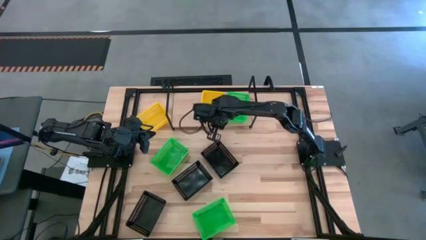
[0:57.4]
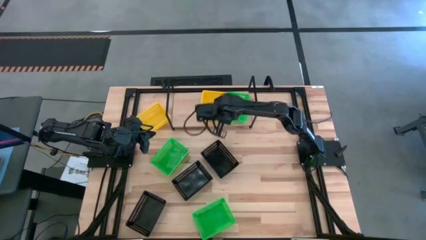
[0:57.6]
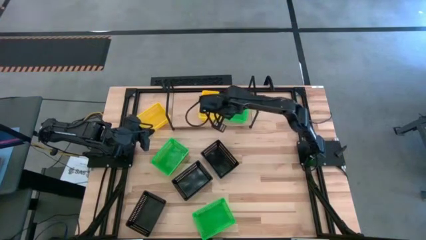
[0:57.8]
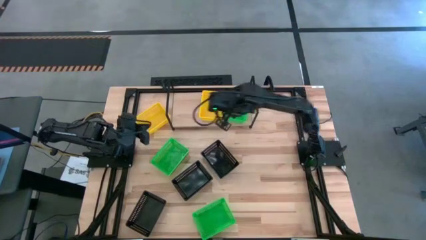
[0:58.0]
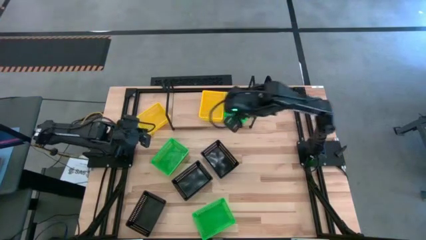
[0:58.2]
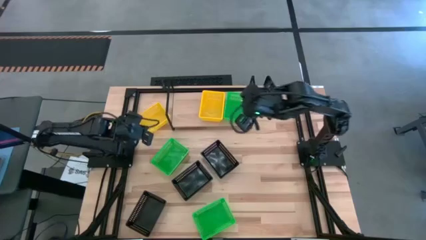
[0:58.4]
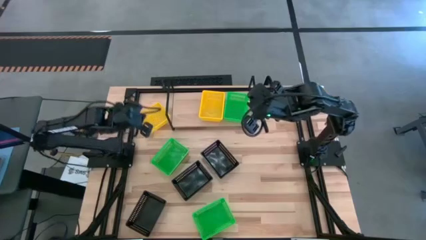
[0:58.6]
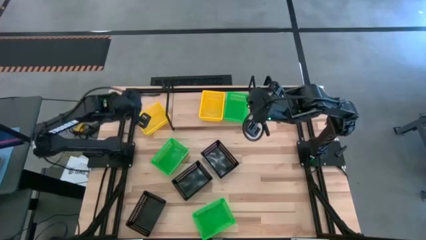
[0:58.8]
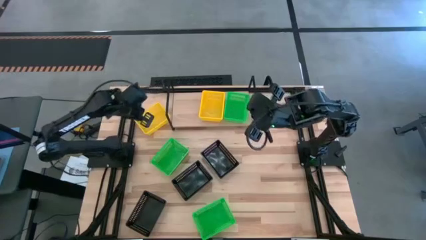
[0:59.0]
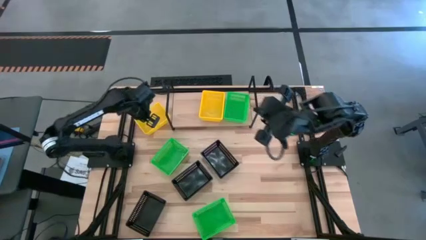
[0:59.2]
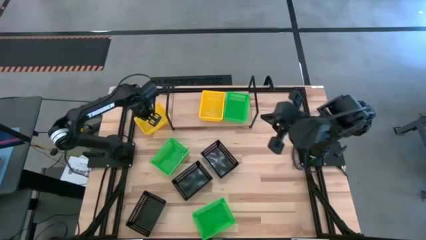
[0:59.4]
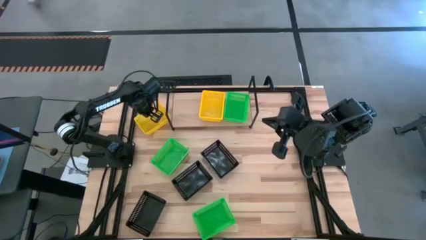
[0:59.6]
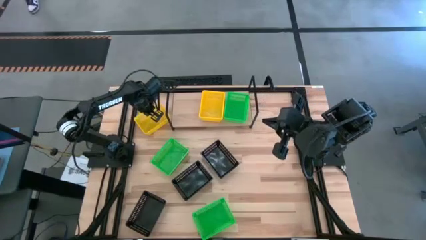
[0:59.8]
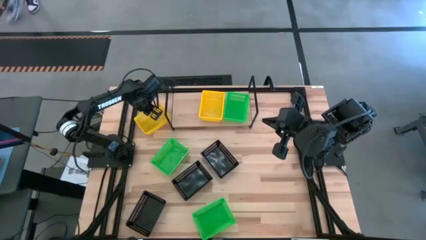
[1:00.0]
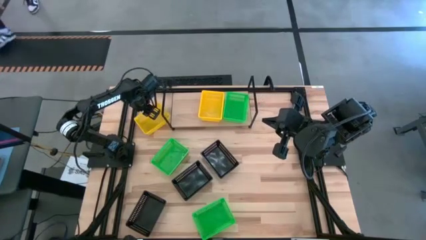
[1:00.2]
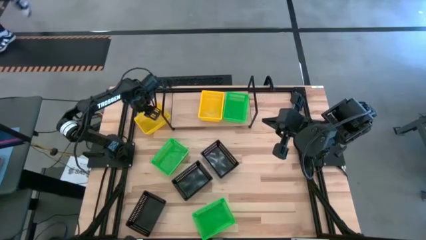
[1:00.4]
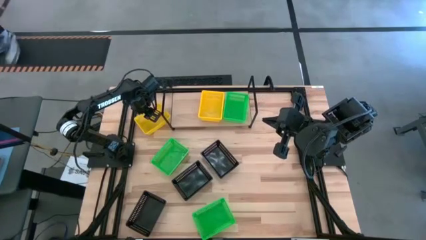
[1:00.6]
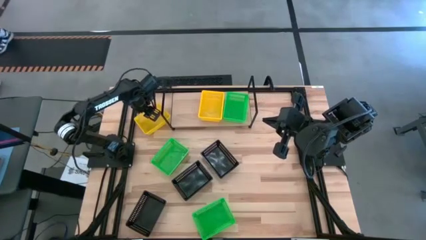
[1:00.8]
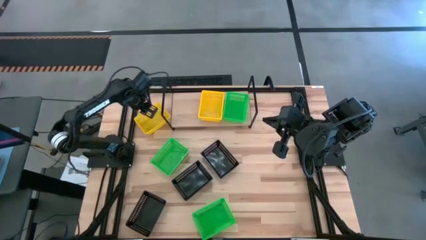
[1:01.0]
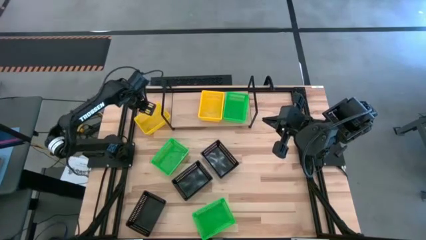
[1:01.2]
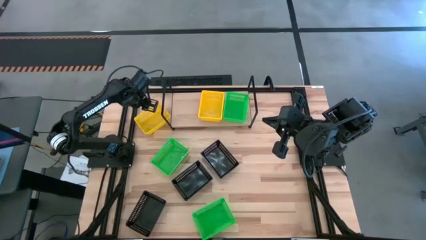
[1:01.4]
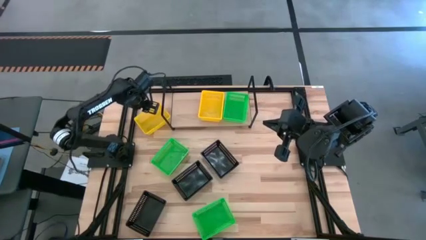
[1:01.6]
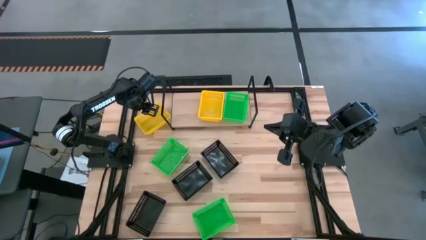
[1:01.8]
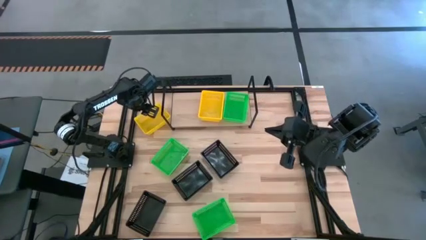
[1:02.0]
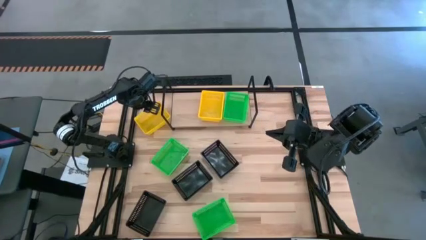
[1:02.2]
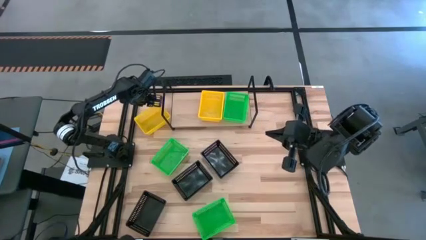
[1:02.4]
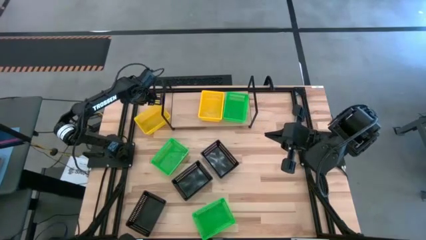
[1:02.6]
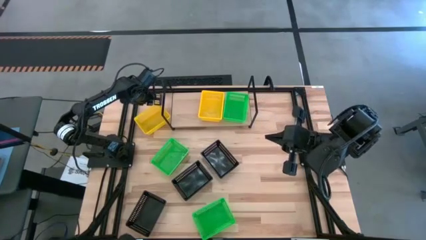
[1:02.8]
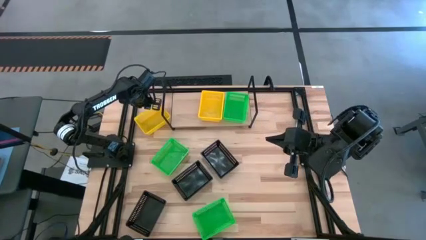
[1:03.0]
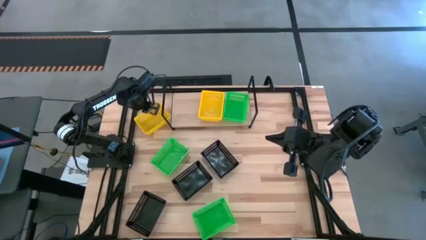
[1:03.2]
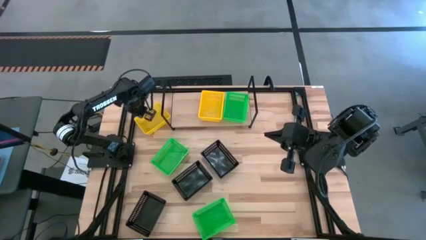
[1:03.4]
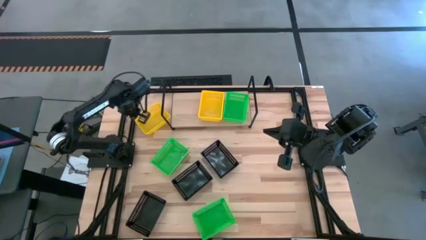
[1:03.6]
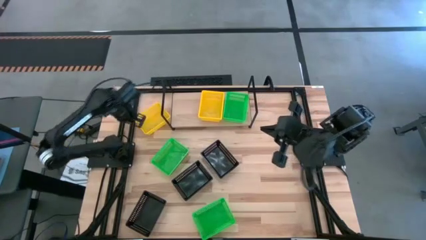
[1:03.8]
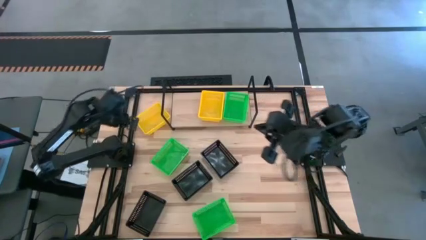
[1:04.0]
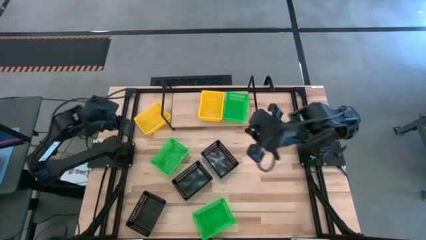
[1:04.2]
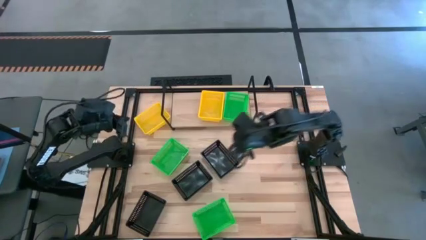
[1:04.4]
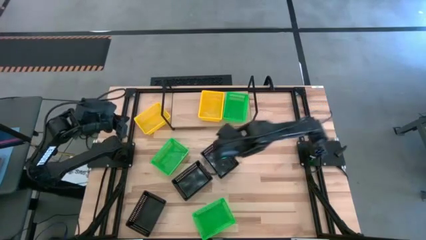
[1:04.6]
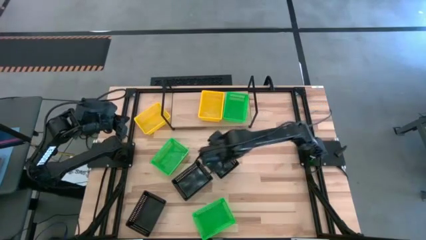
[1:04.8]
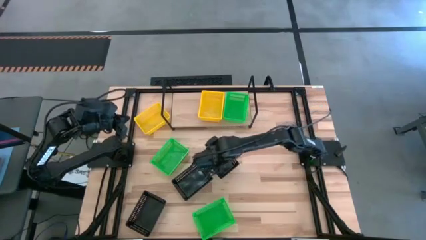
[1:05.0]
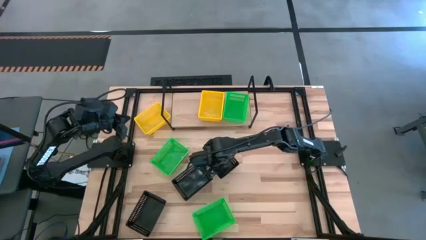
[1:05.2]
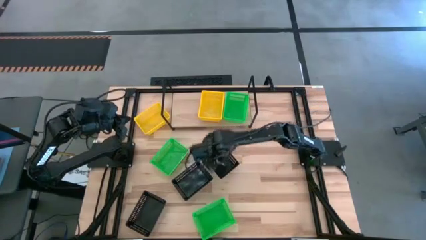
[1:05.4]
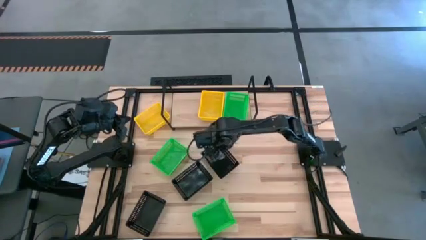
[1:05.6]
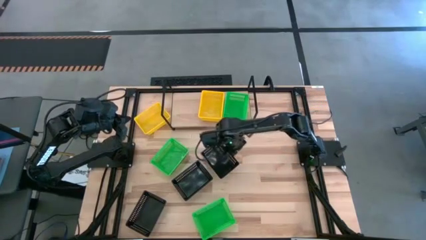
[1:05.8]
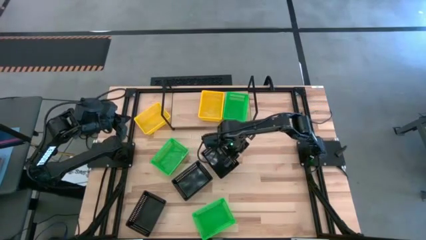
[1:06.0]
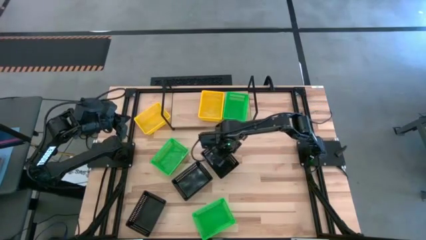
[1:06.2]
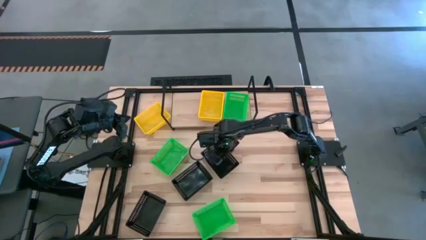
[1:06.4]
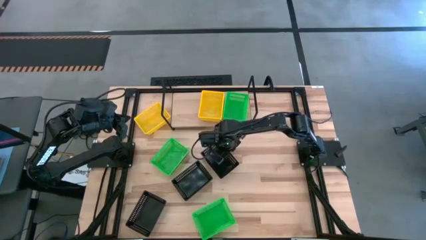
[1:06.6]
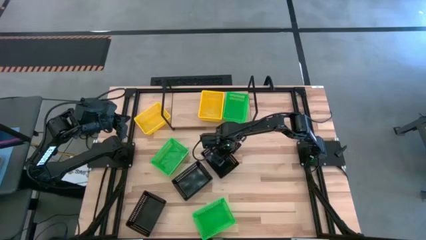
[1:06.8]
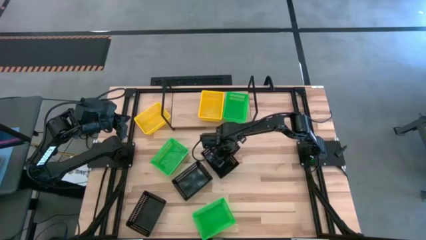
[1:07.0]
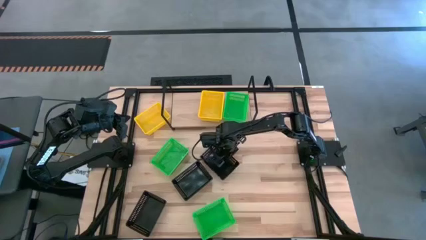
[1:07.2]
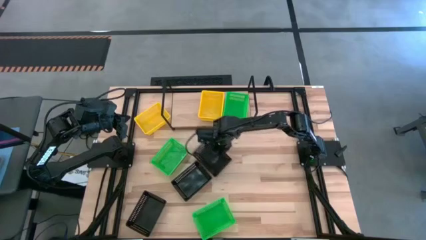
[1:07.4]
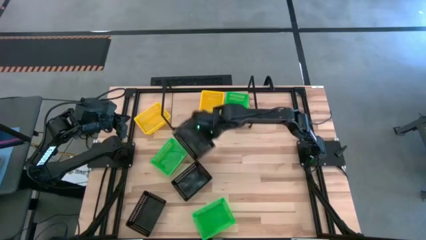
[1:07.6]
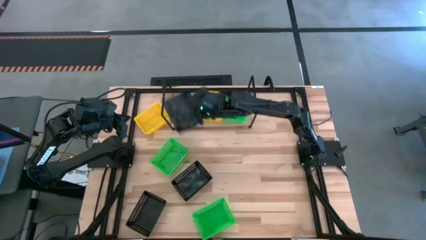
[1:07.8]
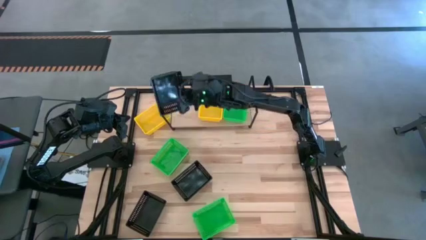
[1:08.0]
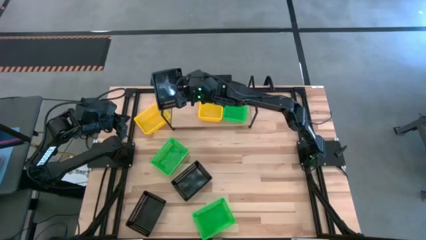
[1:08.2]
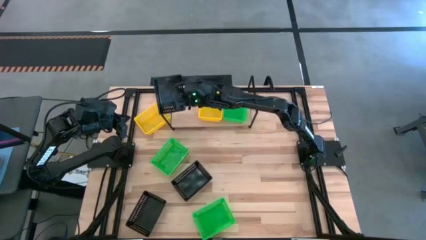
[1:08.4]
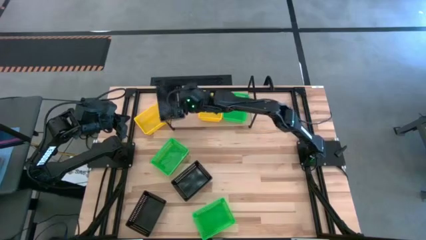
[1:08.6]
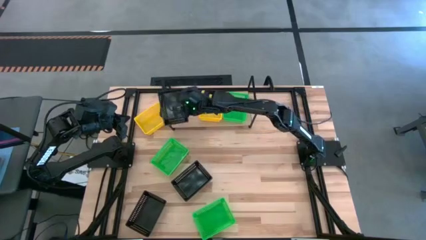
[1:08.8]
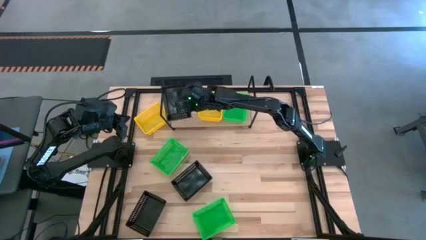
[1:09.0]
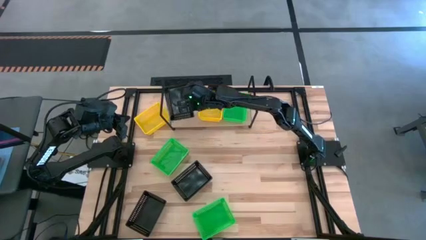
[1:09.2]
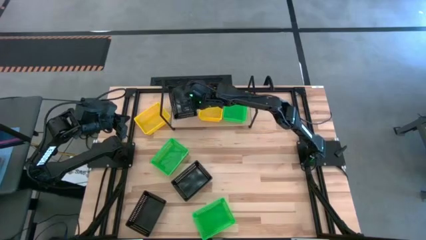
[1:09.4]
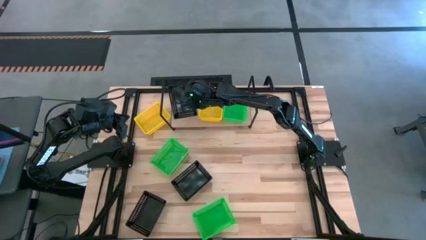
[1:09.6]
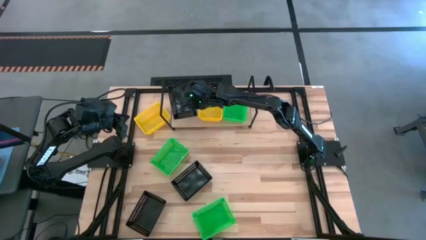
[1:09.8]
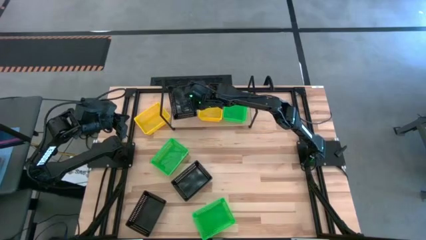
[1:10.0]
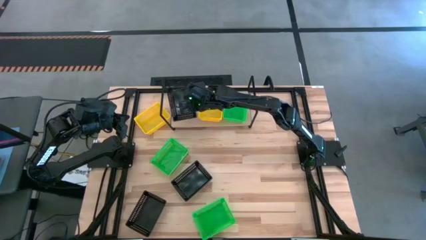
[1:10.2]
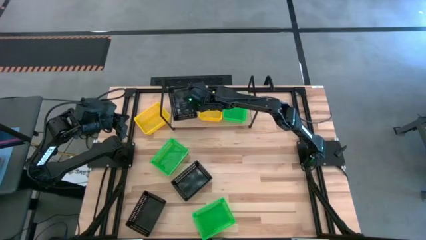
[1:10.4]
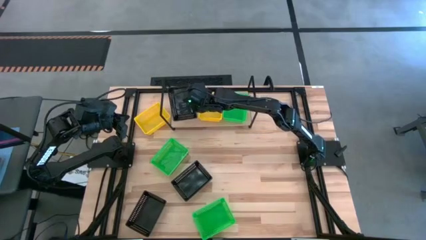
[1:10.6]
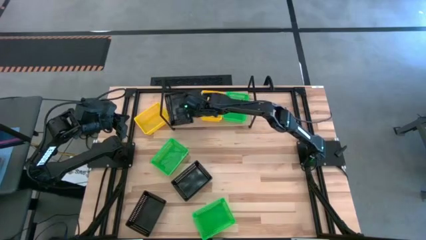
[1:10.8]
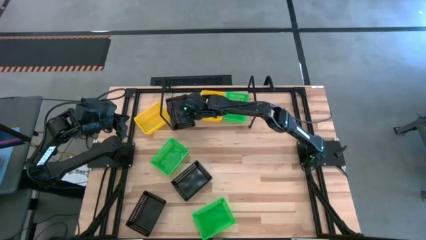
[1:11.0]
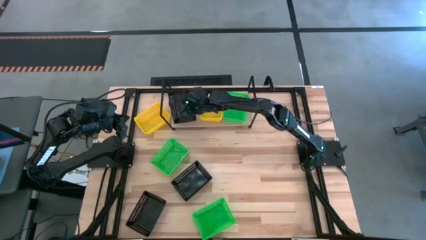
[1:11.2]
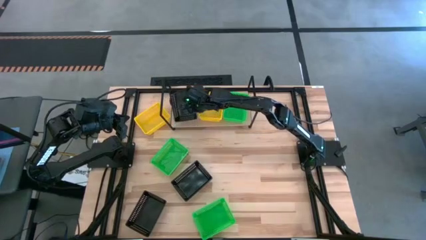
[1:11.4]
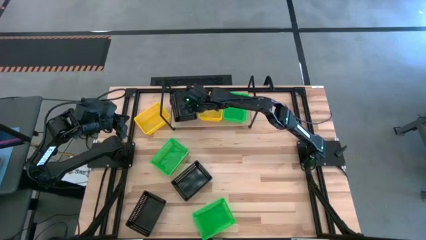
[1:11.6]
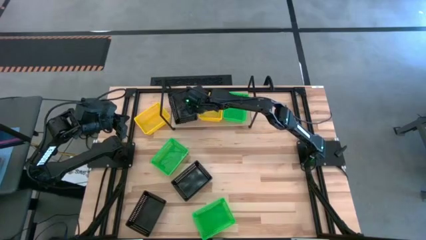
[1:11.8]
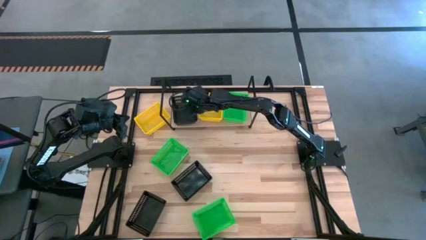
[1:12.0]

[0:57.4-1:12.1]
Task: Stack baskets on shelf by color
Put the top right black bin on the shelf

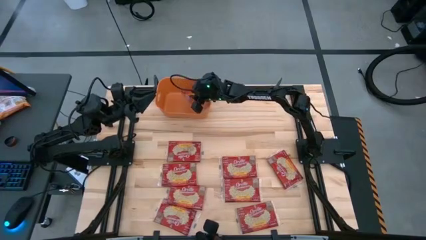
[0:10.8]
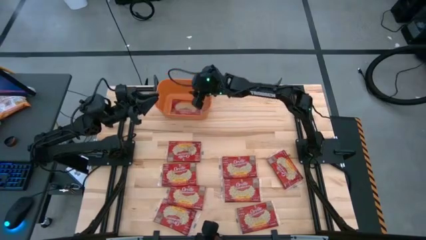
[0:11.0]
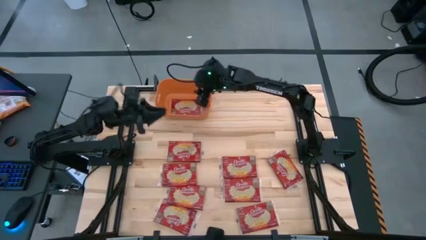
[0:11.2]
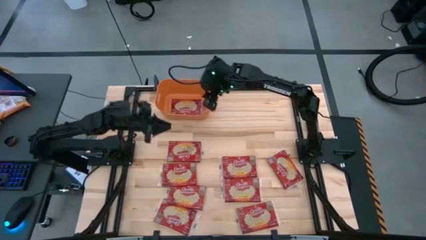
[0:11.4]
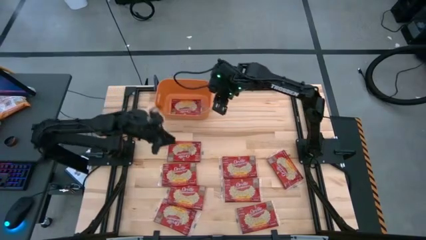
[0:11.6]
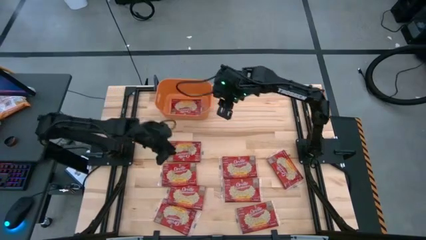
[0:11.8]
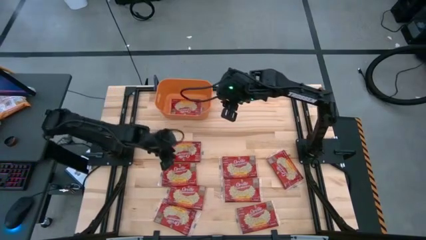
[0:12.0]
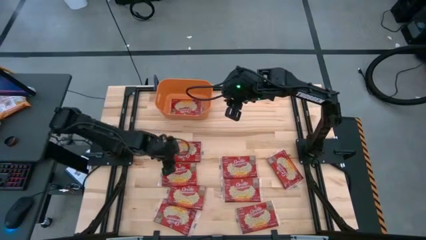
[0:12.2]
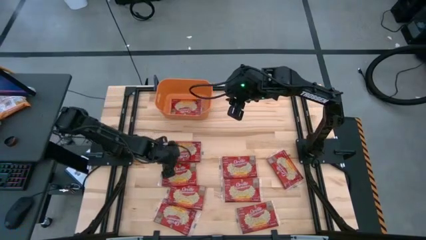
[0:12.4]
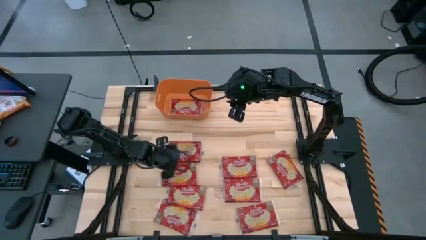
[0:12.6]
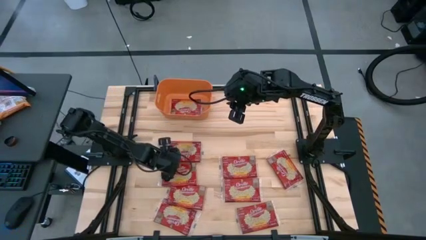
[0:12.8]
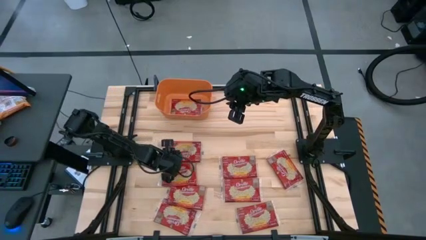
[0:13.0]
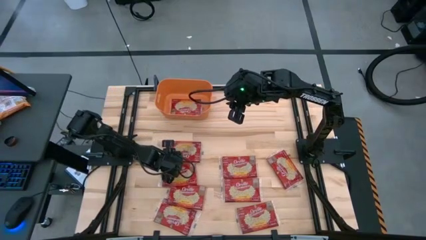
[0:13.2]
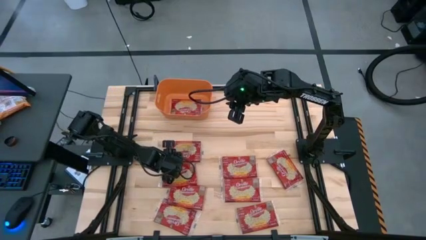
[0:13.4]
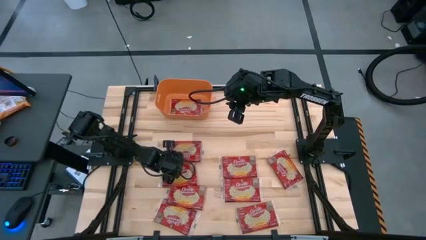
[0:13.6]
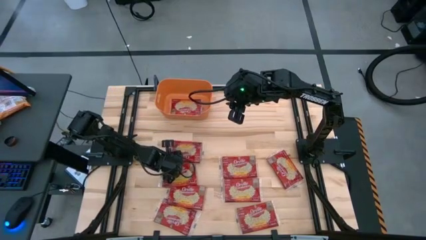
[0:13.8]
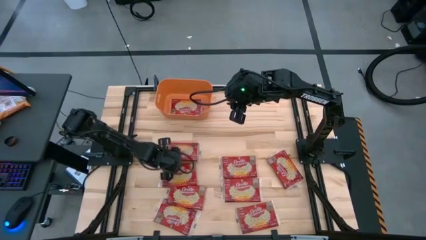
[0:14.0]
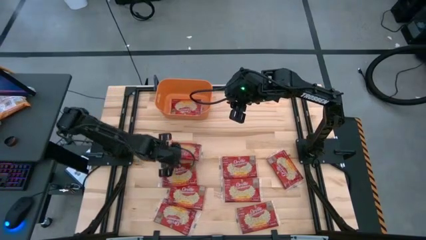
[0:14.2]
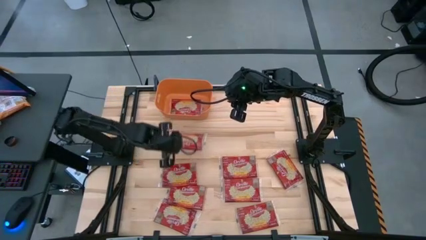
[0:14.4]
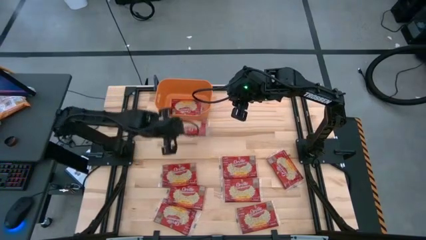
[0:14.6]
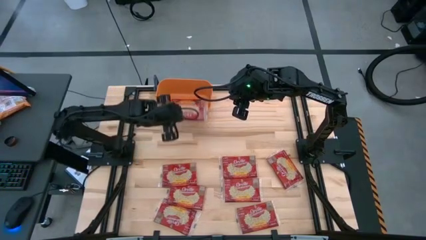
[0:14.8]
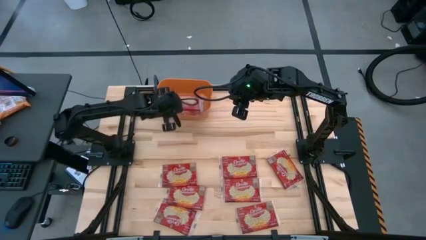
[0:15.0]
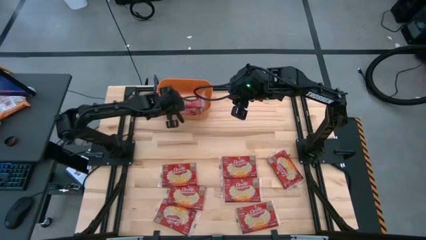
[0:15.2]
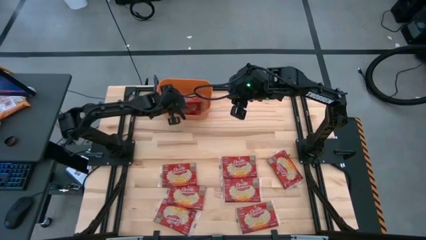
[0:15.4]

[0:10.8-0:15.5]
Task: Sort popcorn bags into baskets
Put the red popcorn bag into the orange bin
